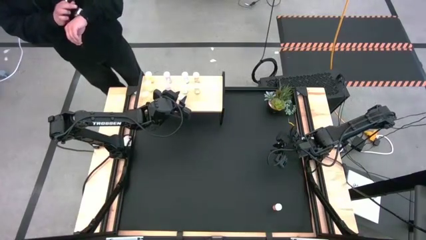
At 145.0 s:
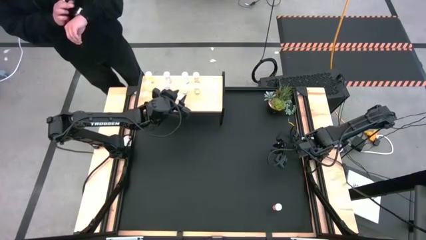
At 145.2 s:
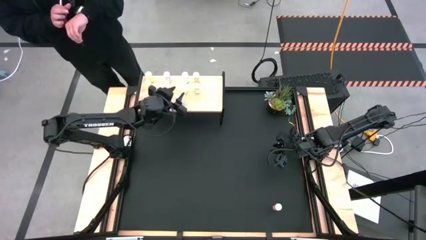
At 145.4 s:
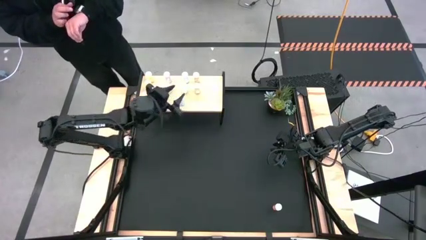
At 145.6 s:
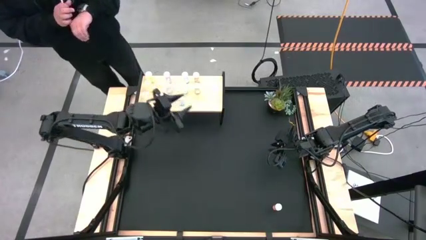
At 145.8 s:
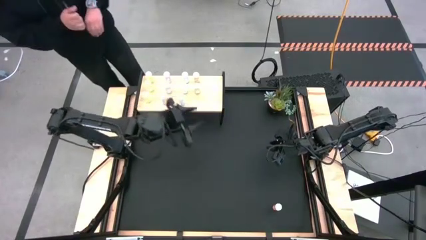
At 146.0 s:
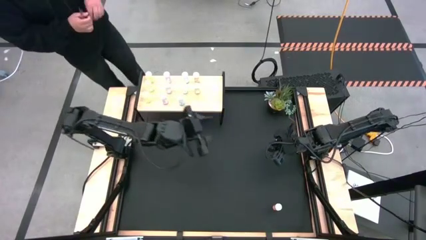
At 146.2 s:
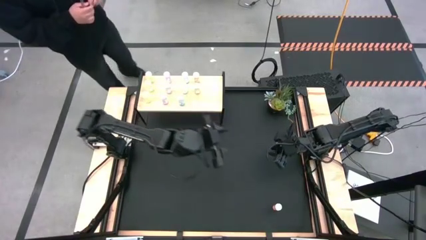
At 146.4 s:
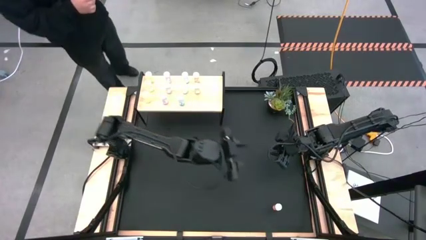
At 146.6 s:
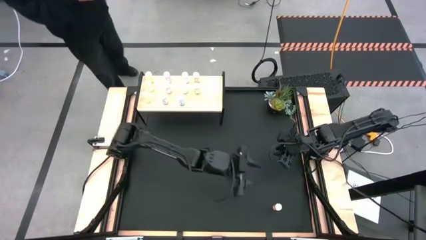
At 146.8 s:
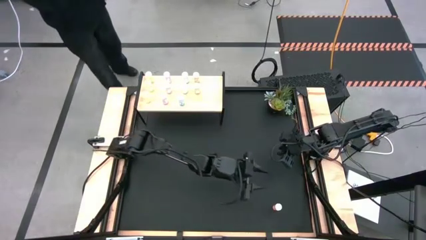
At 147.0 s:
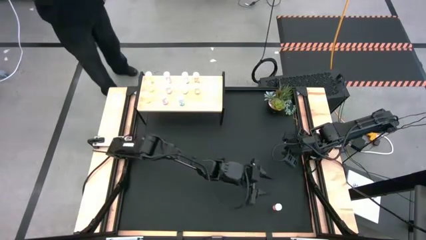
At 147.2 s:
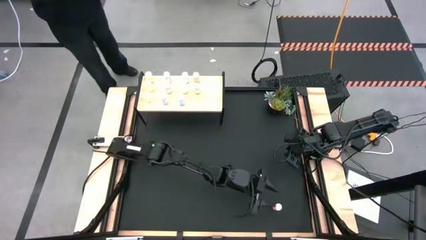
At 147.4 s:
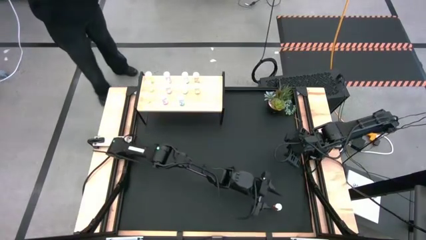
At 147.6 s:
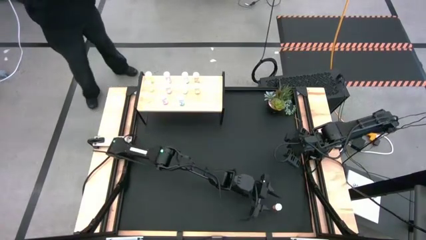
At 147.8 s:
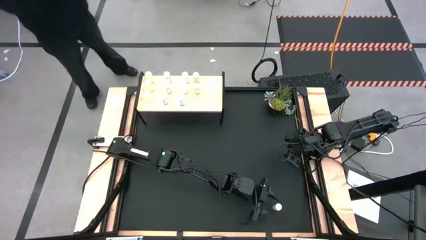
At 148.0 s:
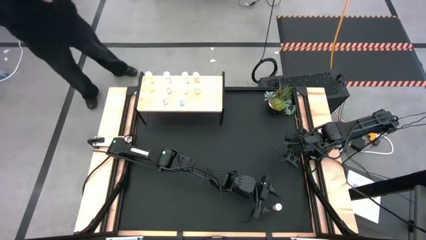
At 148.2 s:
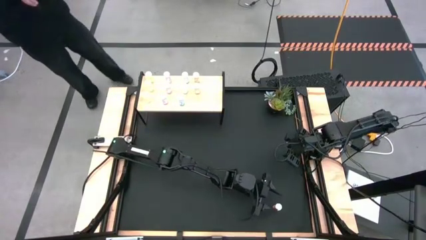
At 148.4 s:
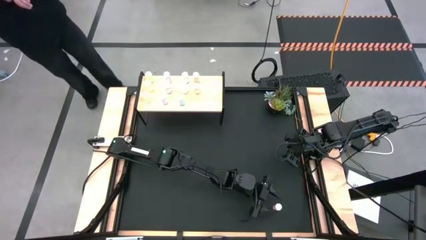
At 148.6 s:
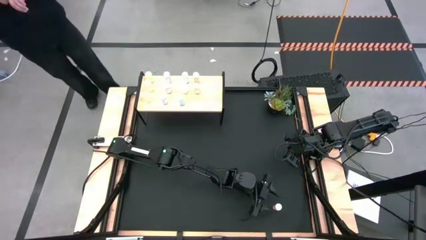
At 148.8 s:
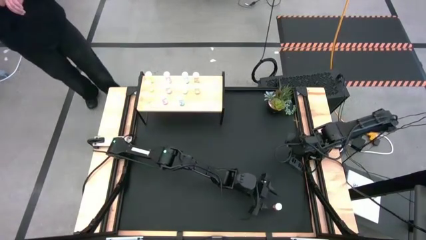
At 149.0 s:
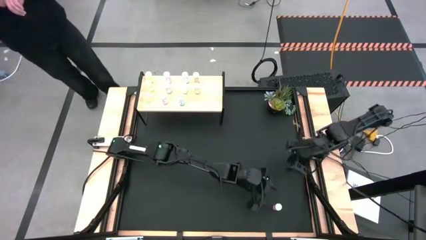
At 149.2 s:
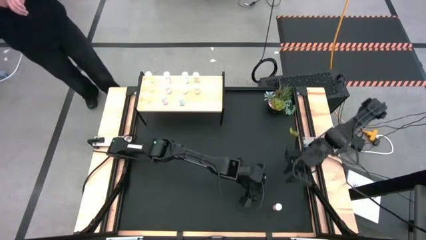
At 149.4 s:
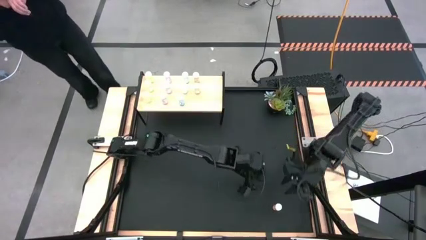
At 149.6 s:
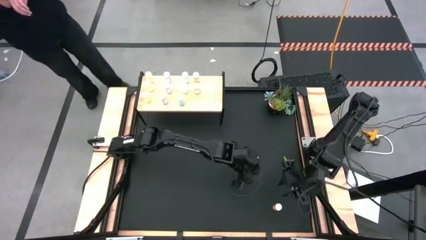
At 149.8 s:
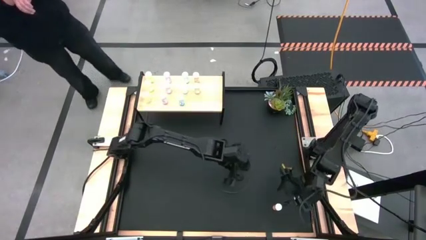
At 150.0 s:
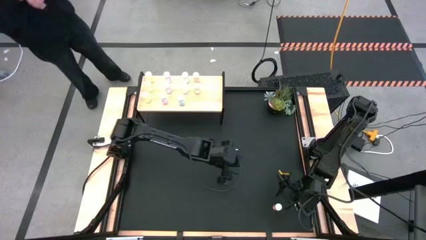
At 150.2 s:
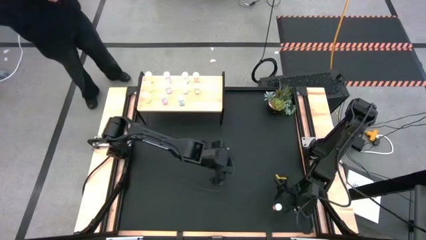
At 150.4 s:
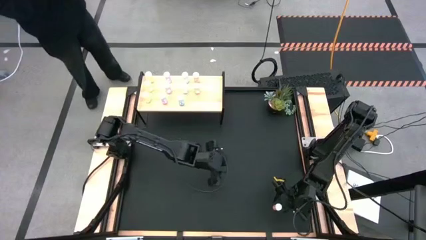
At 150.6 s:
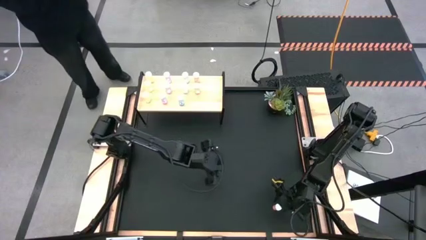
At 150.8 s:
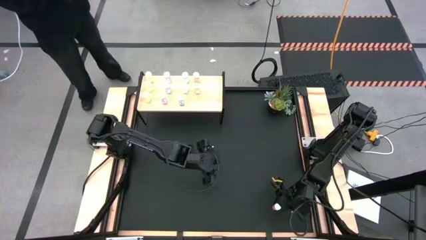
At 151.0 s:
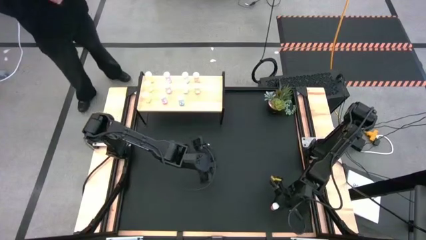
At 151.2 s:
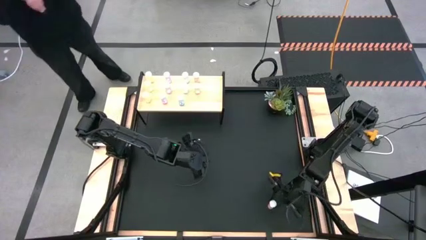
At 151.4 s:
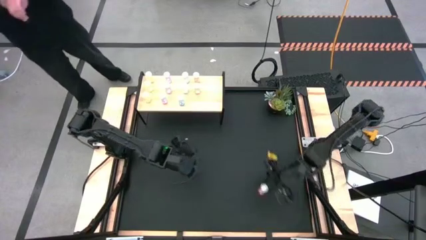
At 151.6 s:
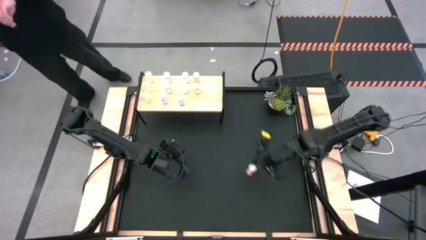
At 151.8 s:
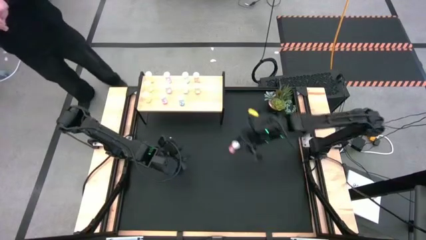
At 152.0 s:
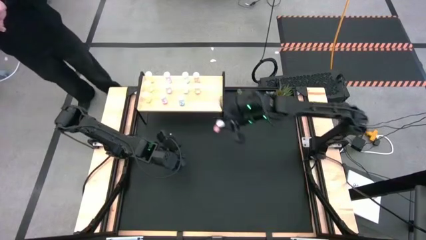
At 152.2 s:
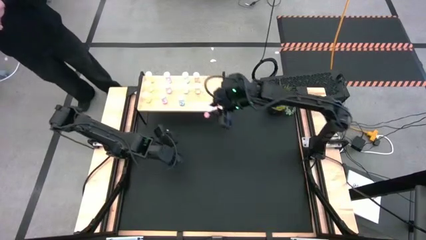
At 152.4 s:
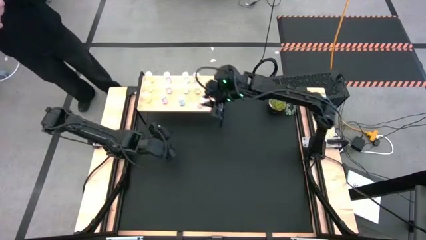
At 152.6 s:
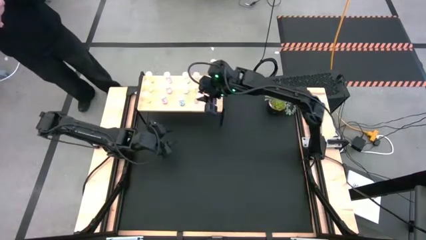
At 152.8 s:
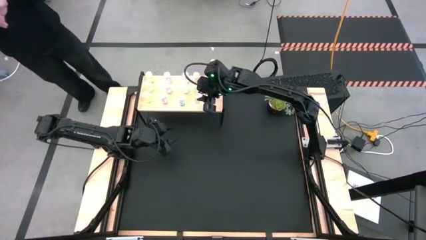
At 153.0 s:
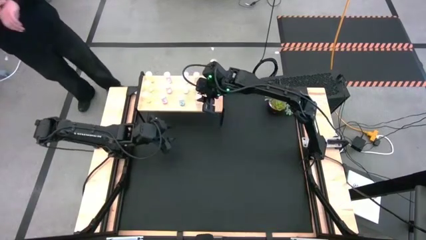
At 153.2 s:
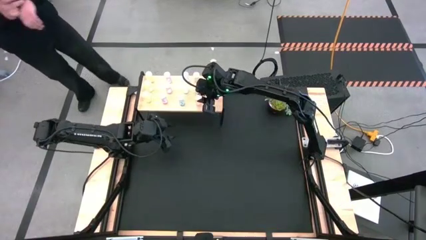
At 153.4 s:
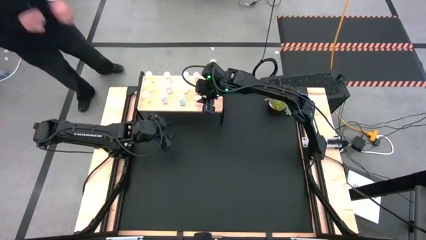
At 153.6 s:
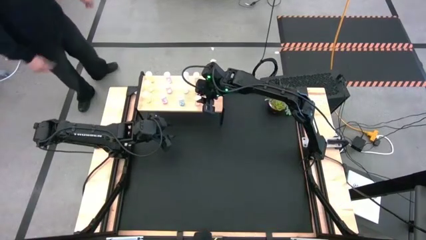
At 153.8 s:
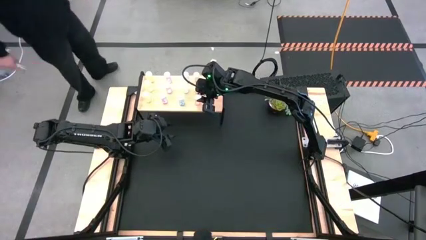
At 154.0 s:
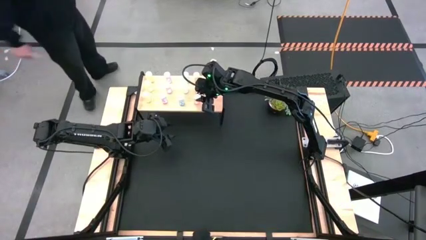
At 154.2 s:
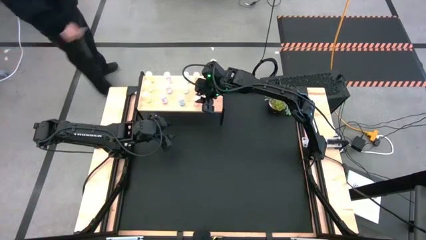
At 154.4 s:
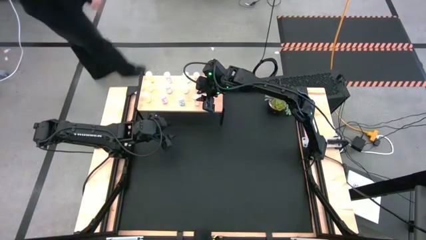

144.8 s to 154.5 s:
Task: Pick and place medicine bottles onto shelf by color
Put the orange medicine bottle aligned with the other orange medicine bottle on the shelf
